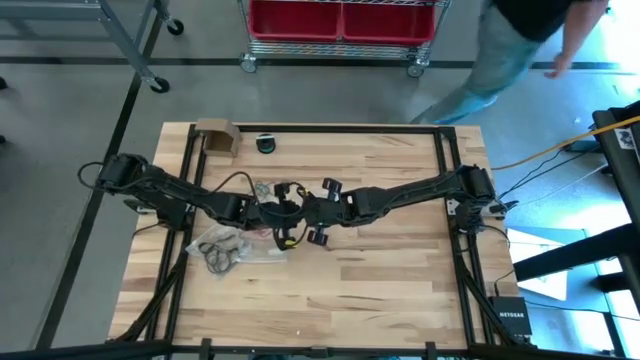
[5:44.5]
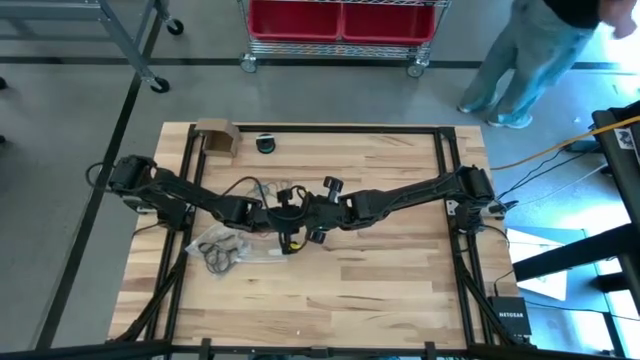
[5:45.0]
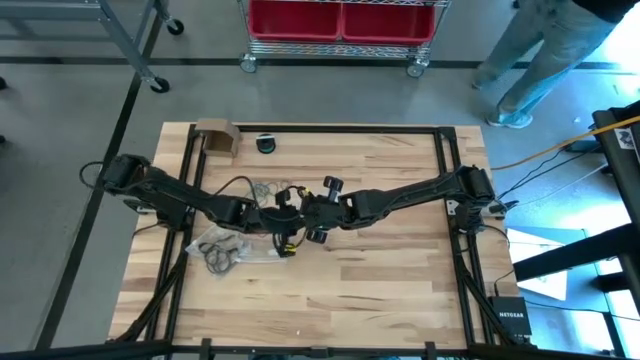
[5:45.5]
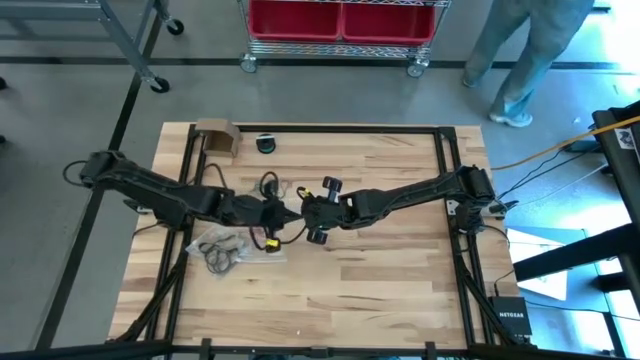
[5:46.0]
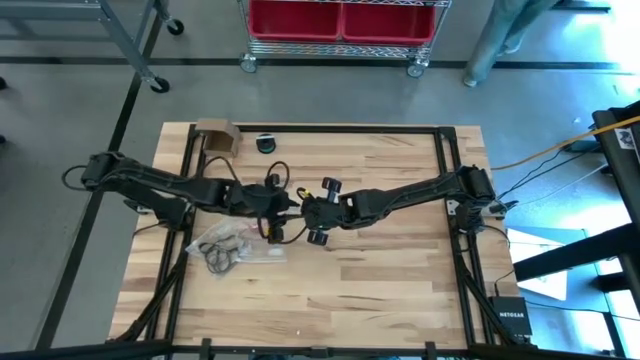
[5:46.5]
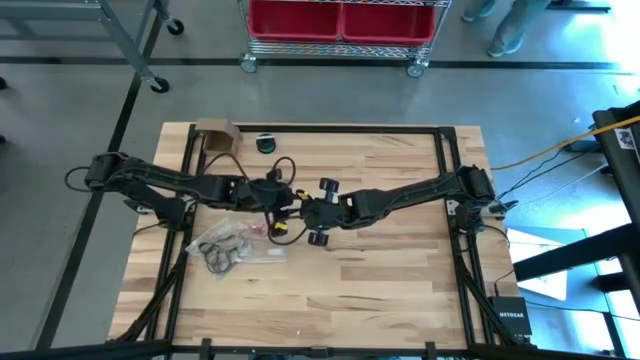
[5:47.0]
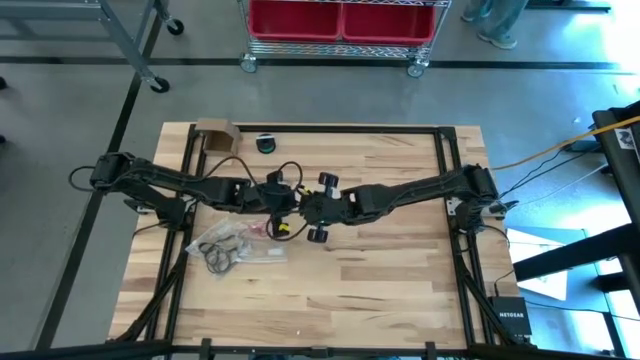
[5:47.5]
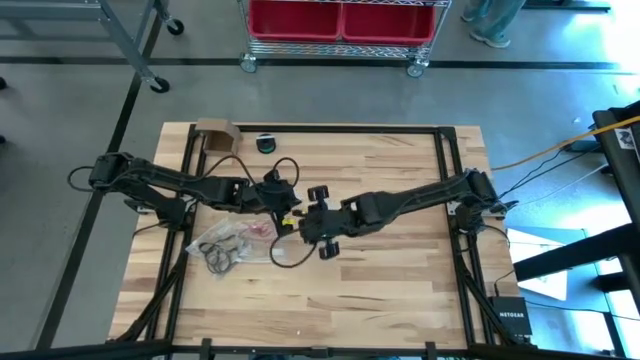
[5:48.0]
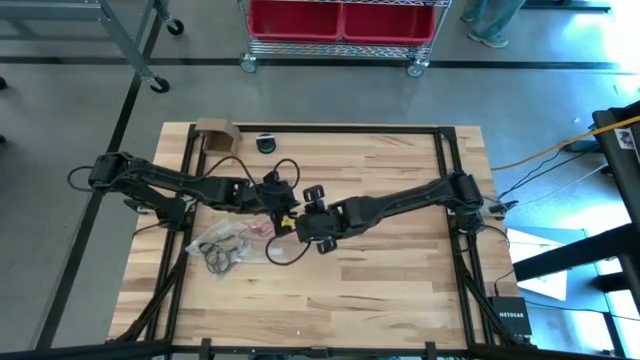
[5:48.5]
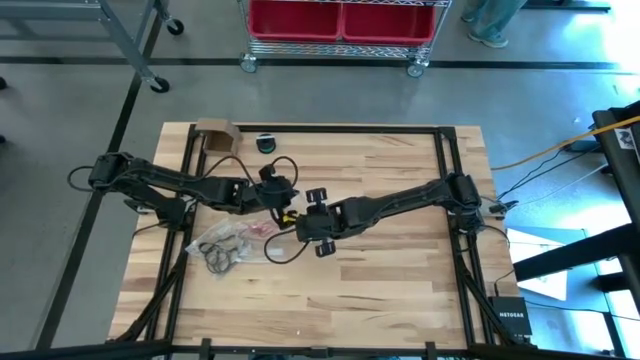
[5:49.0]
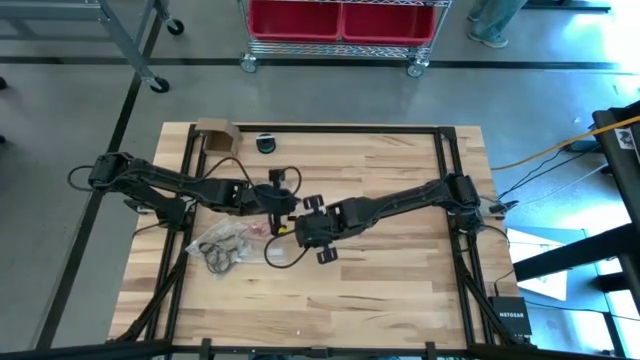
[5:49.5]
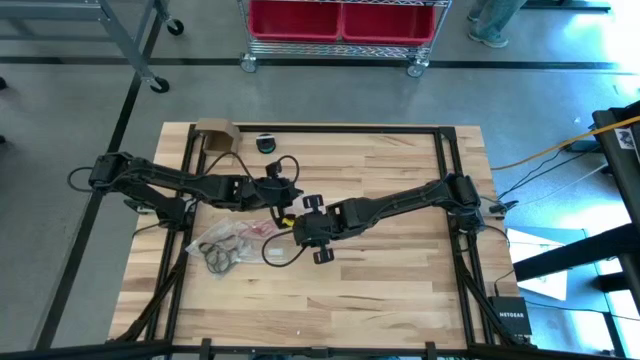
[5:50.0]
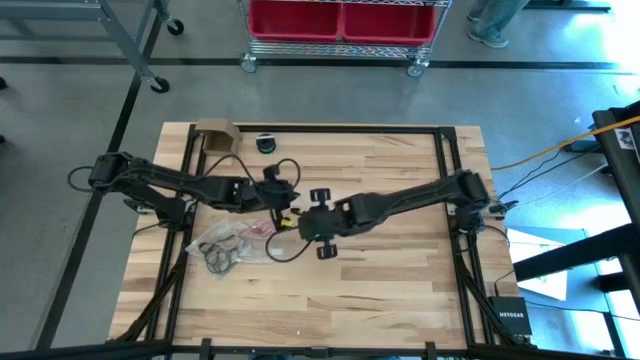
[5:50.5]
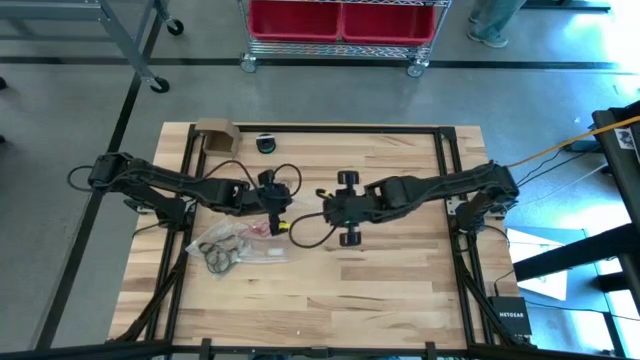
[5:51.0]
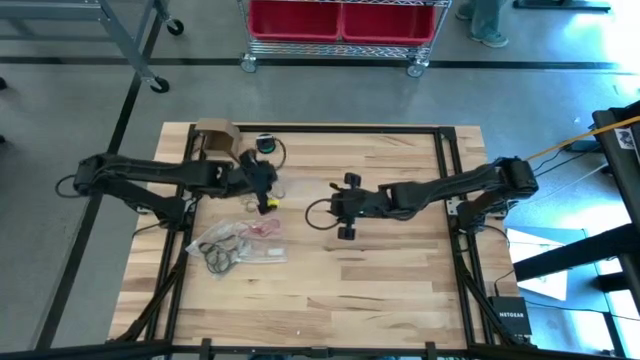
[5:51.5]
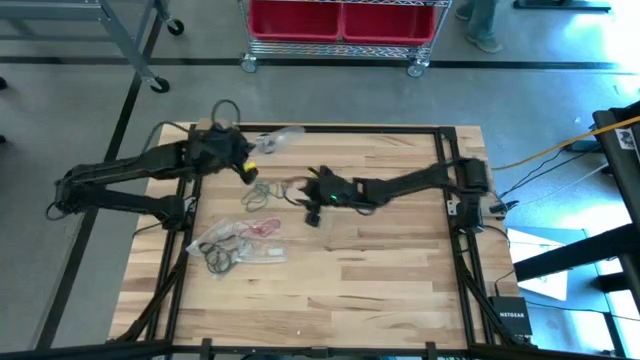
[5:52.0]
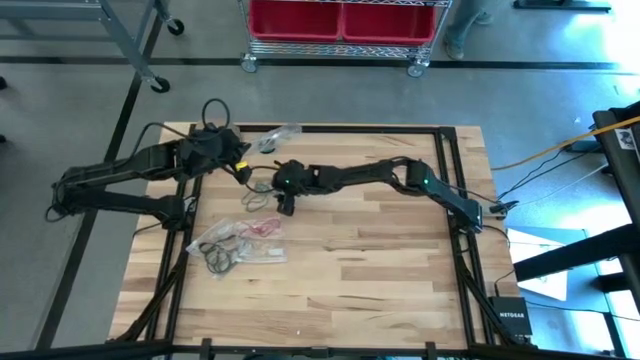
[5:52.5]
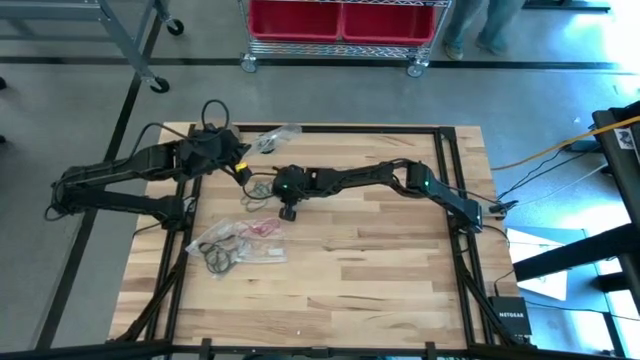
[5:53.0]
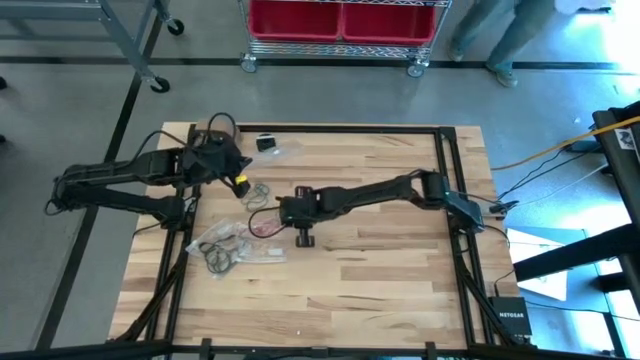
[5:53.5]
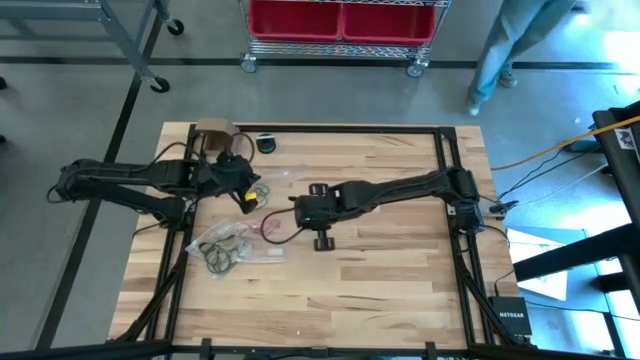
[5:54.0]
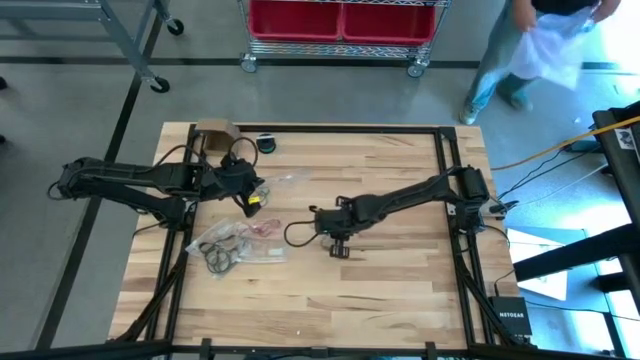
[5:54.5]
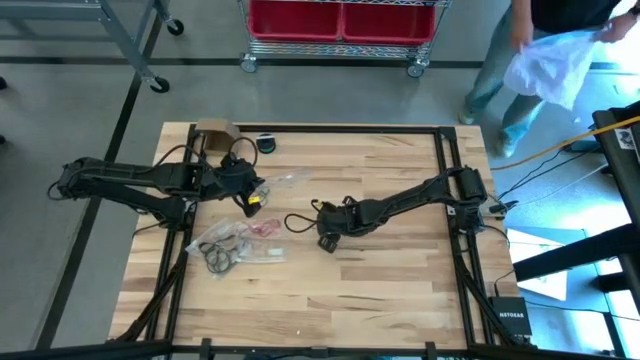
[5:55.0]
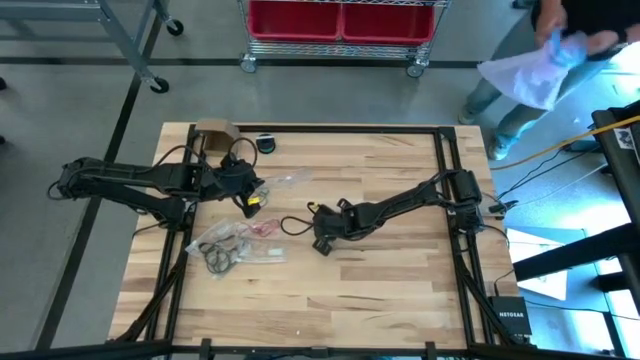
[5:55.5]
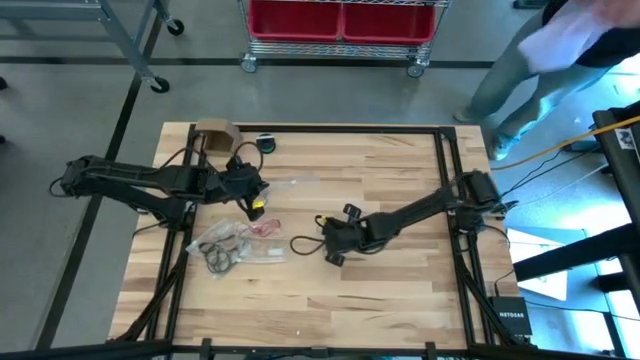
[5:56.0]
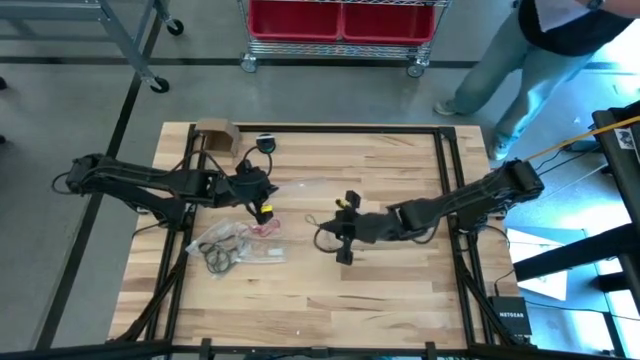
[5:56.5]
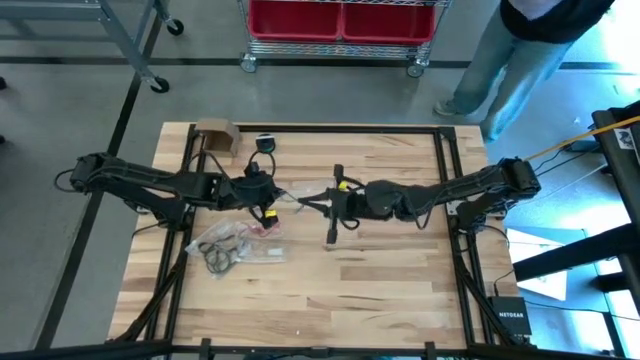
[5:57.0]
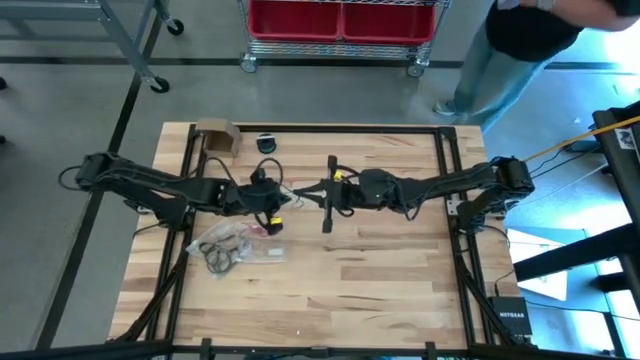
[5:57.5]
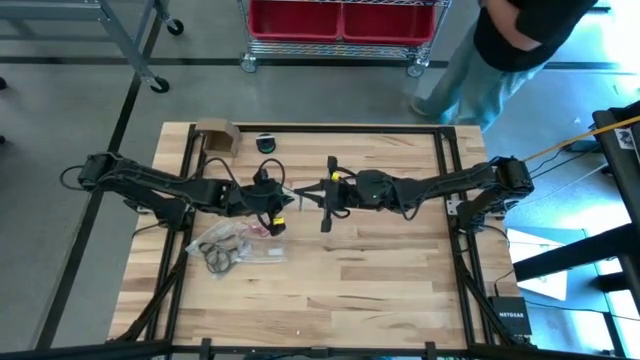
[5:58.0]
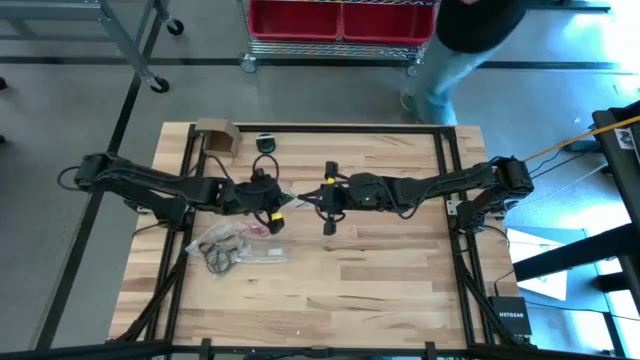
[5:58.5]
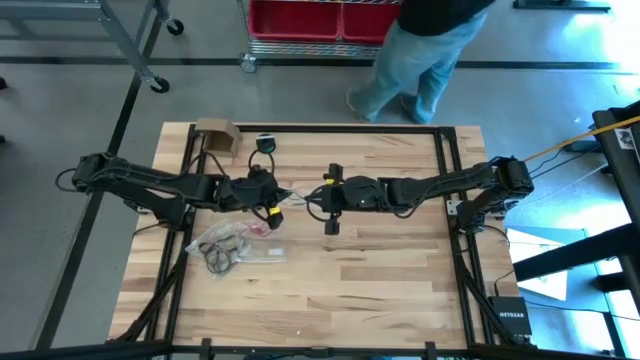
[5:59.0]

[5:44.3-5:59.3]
Task: Sort rubber bands
Put the blue rubber band into the transparent zip bag

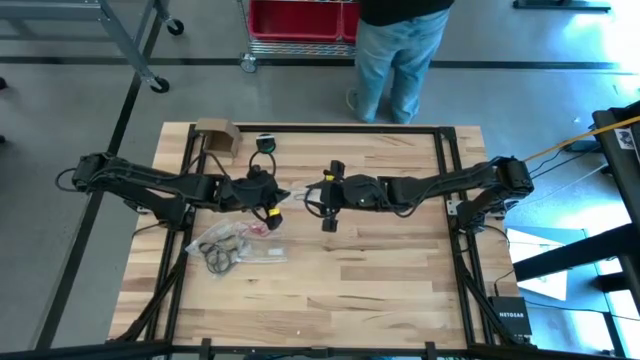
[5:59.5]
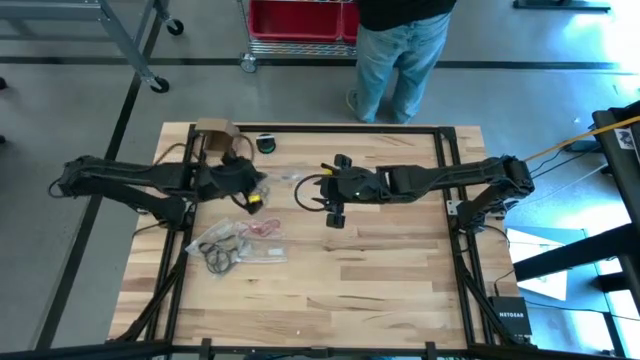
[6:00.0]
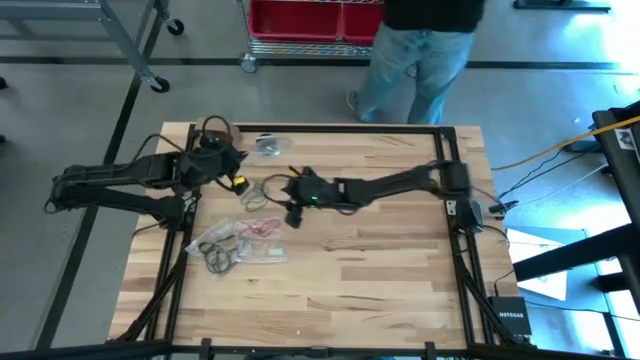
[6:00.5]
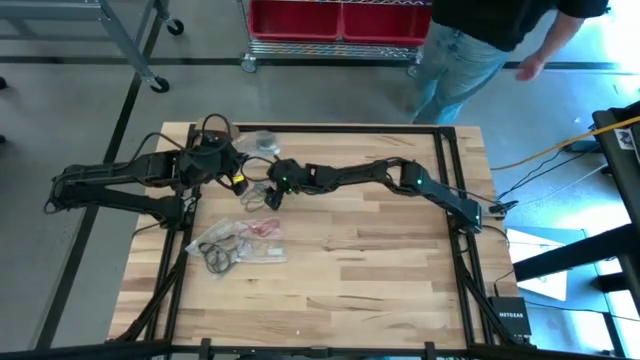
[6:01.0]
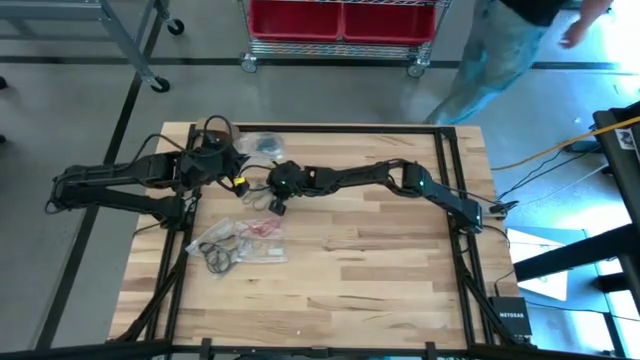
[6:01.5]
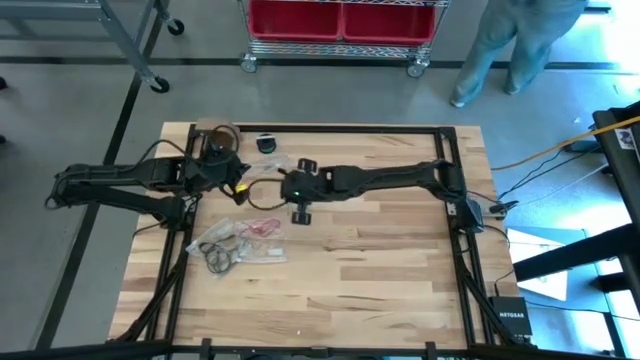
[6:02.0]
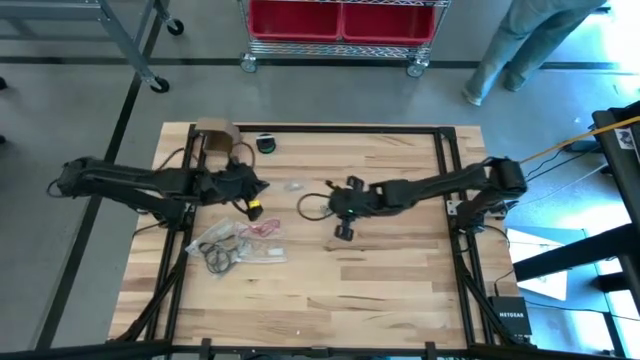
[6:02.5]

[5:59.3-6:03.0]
Put the blue rubber band into the transparent zip bag

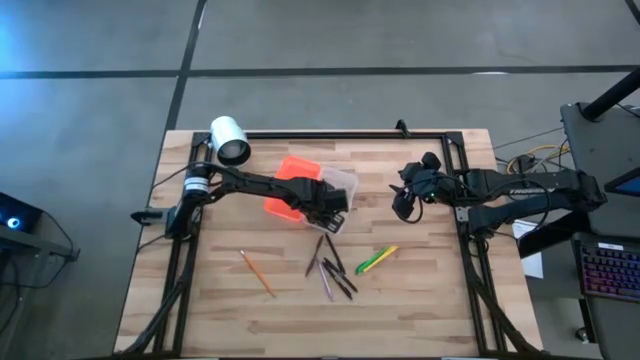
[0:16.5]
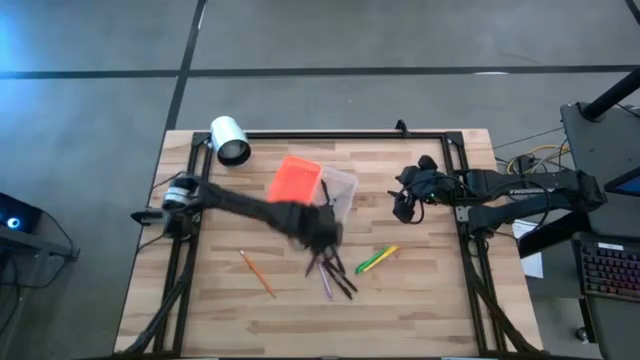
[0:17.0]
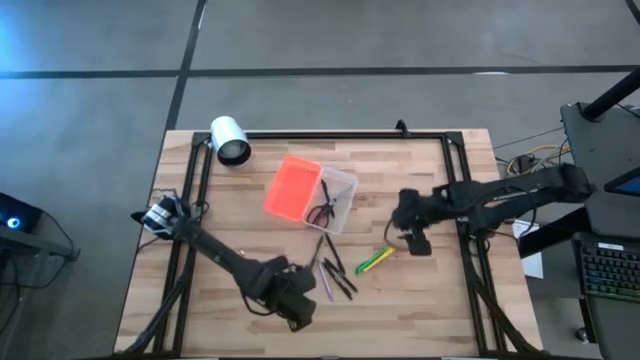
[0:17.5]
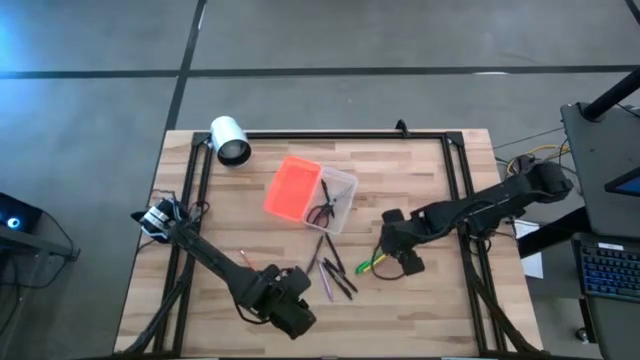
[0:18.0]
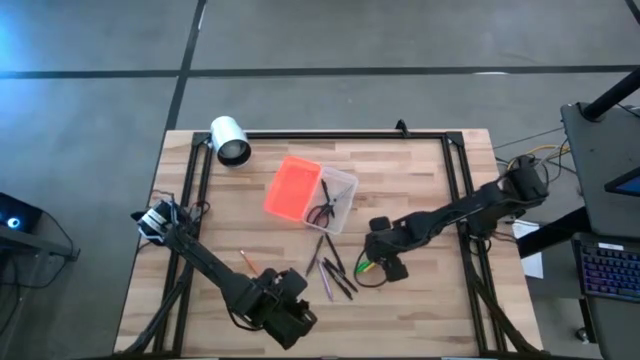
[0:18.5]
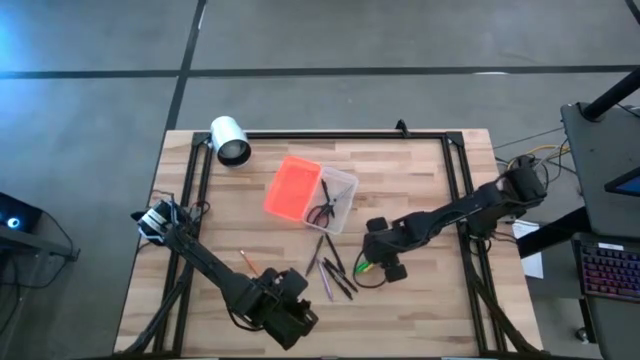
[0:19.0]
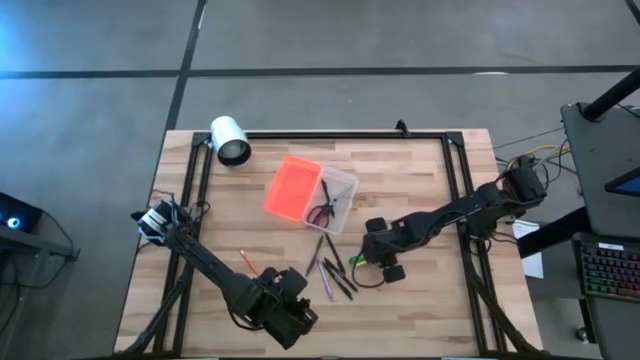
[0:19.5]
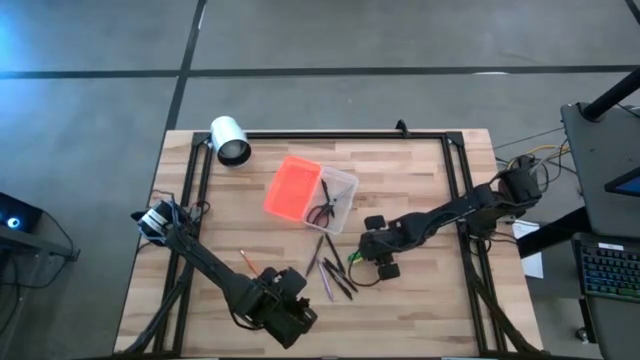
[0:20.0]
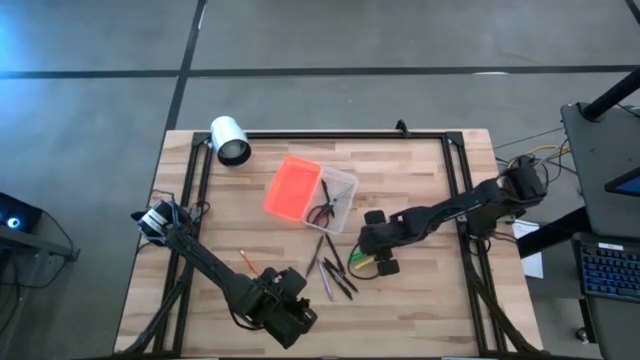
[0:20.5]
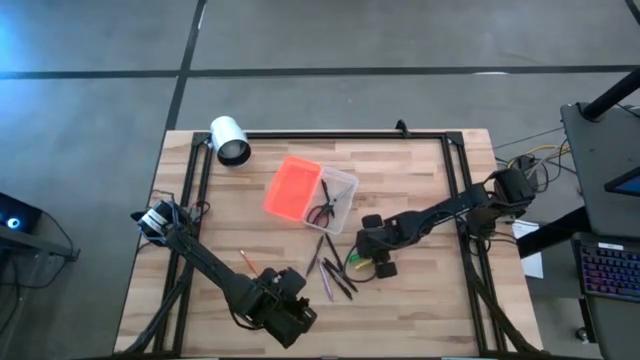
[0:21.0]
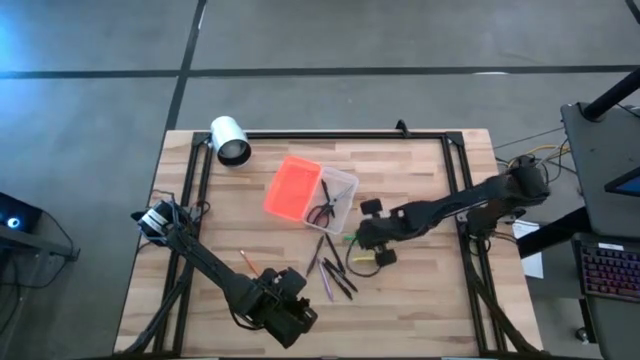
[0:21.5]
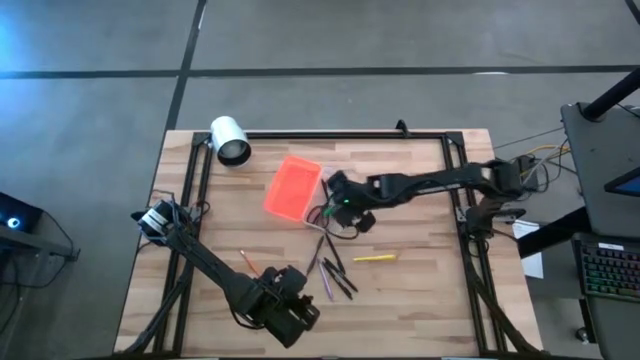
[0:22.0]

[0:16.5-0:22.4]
Task: Pick & place school supplies into a supply box
Put the green pen into the orange supply box
